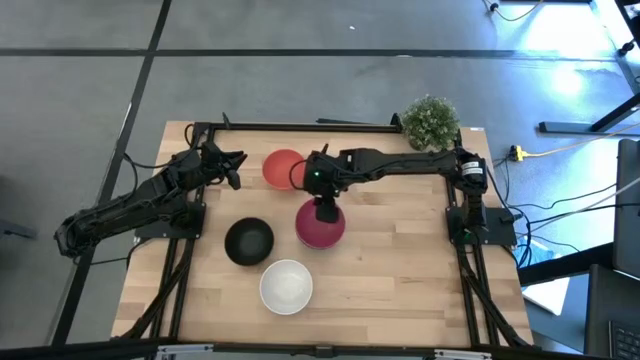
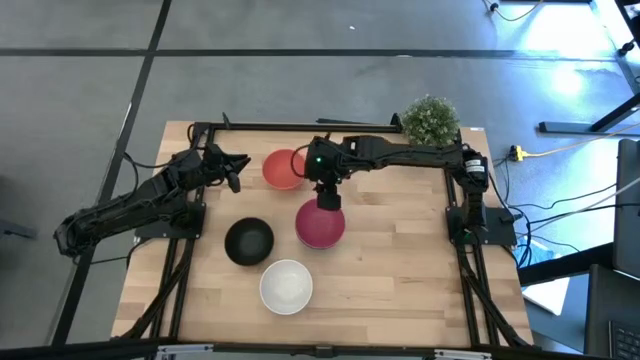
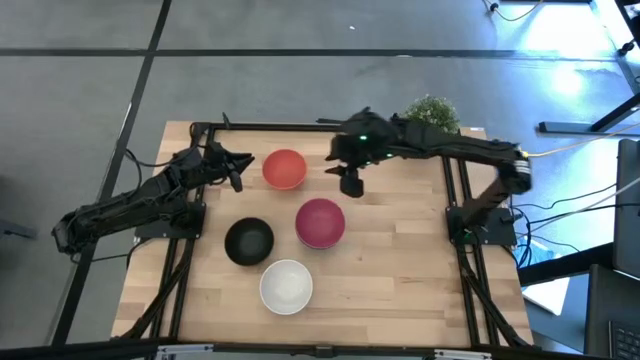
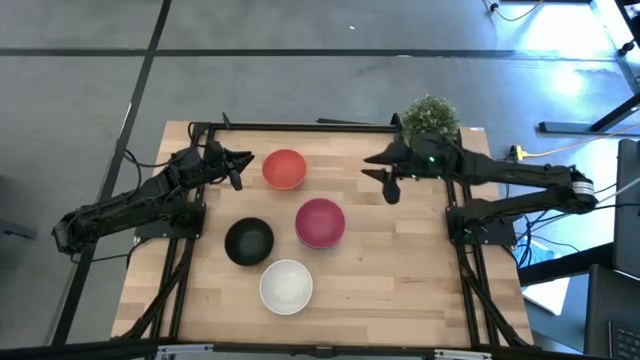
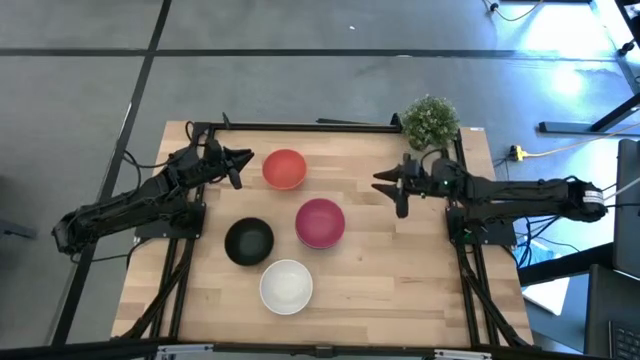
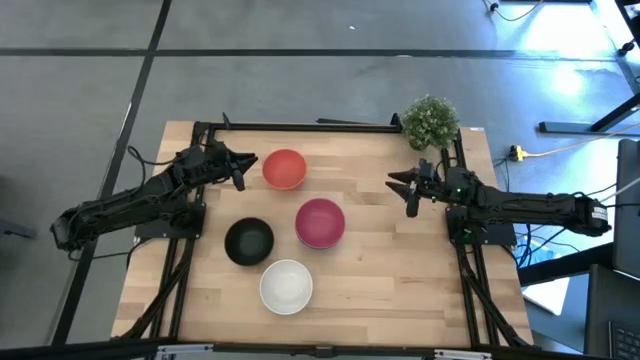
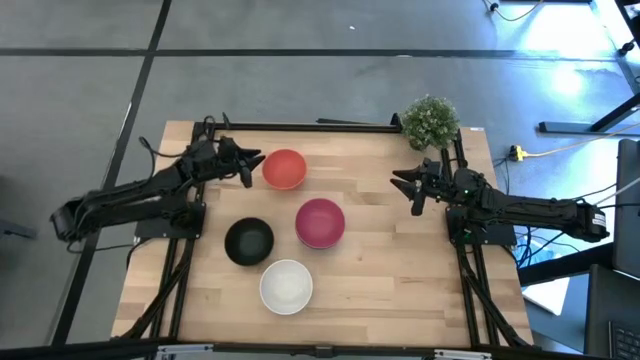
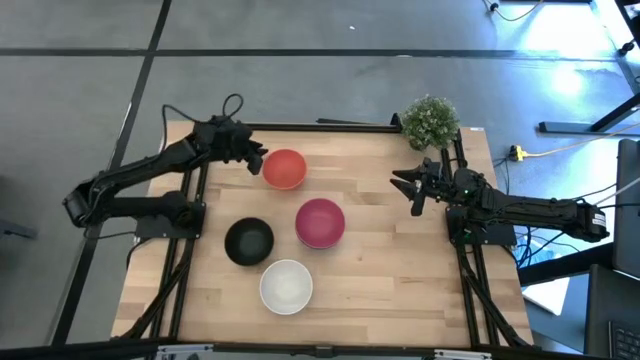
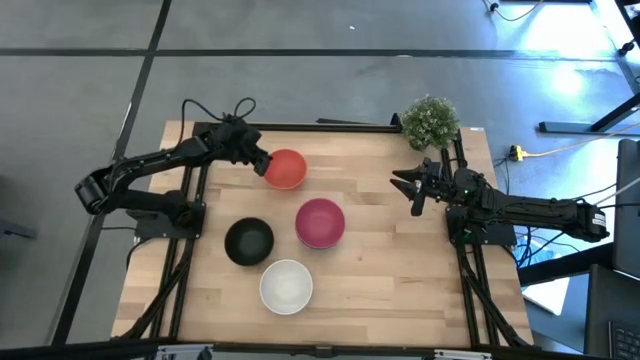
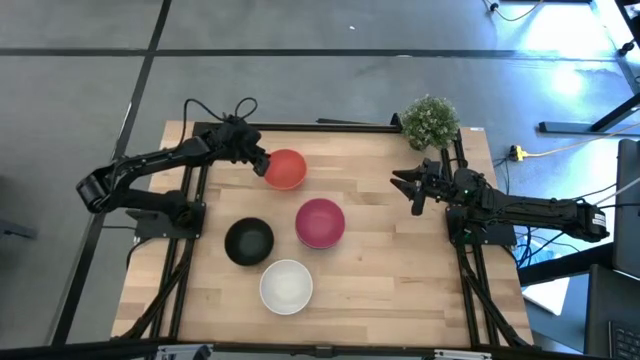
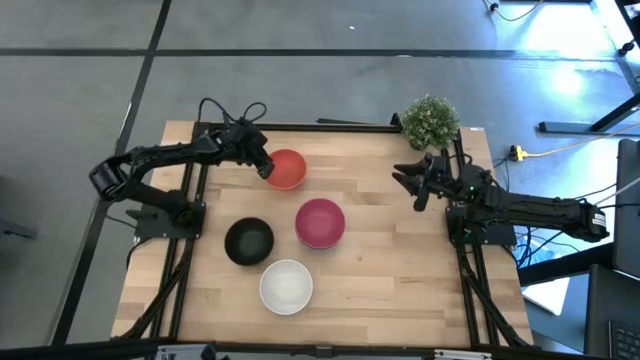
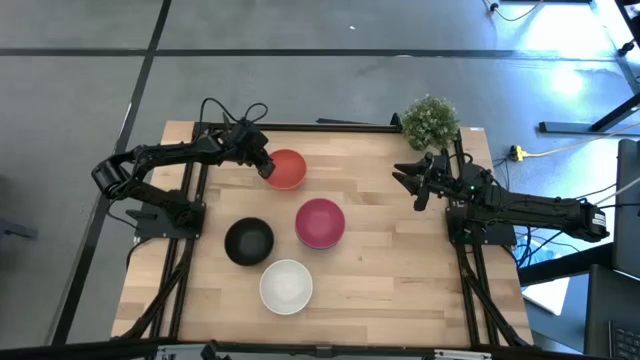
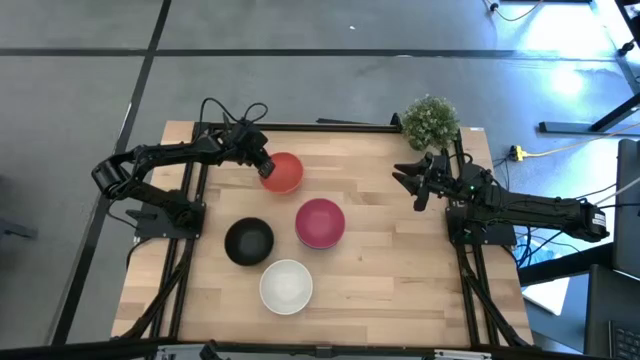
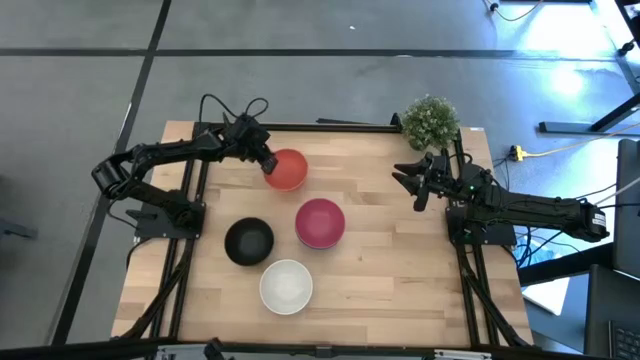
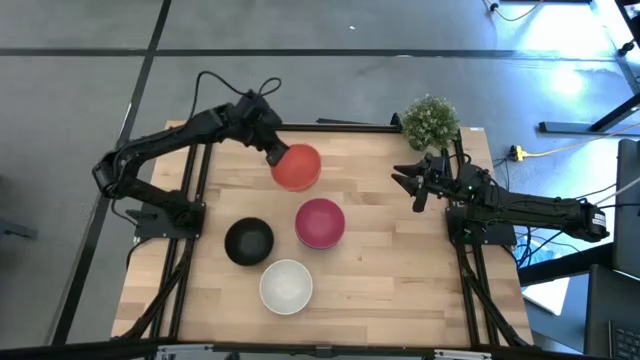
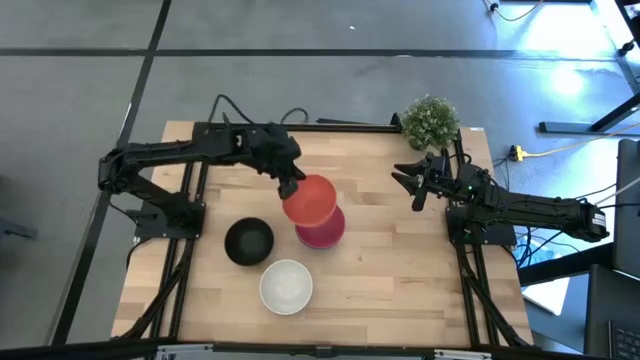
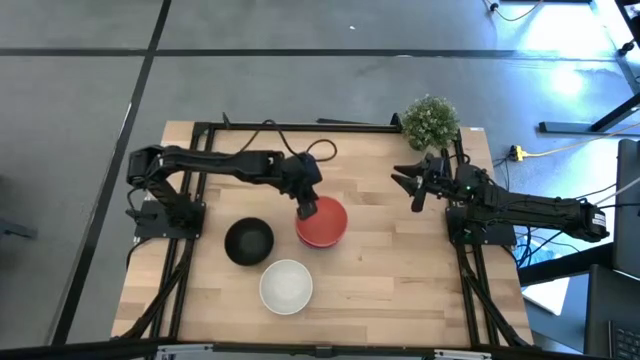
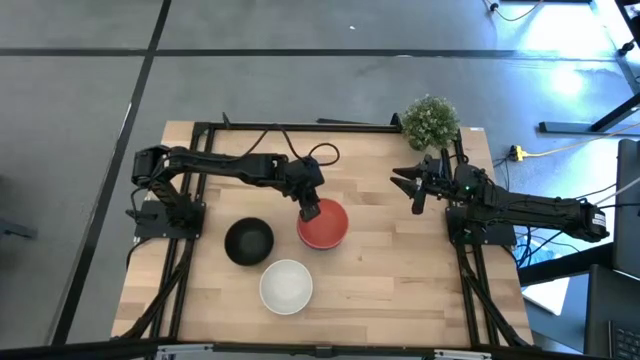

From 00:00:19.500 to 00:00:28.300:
Task: Nest bowls inside each other
Stack the orange bowl on top of the pink bowl

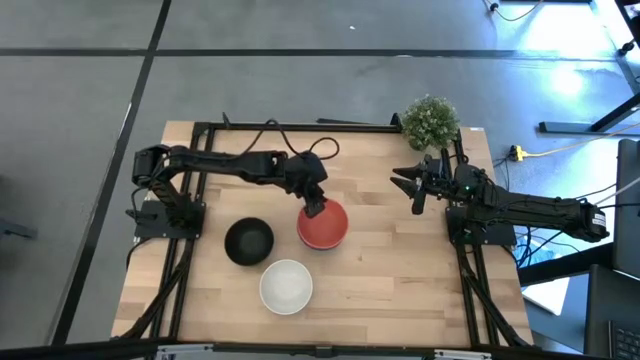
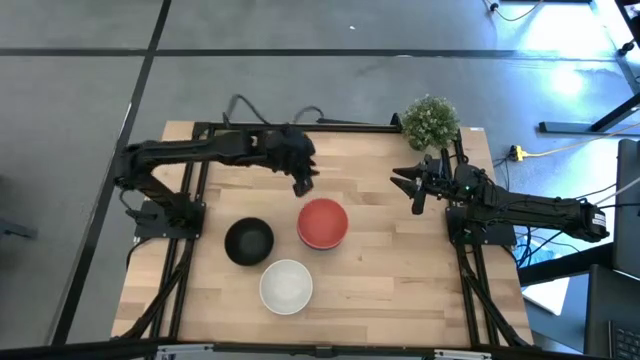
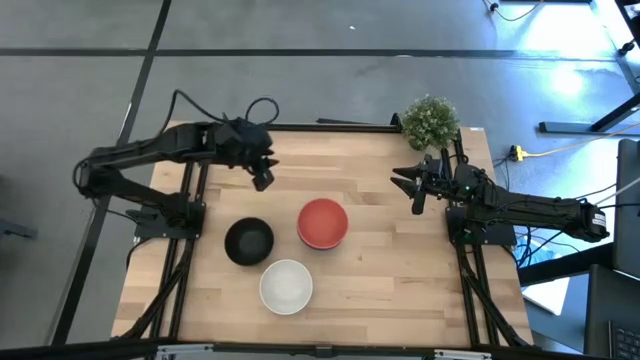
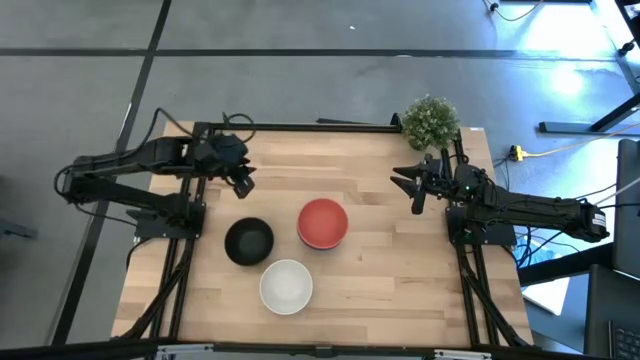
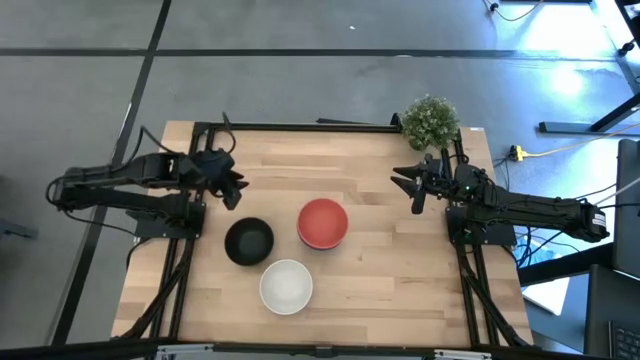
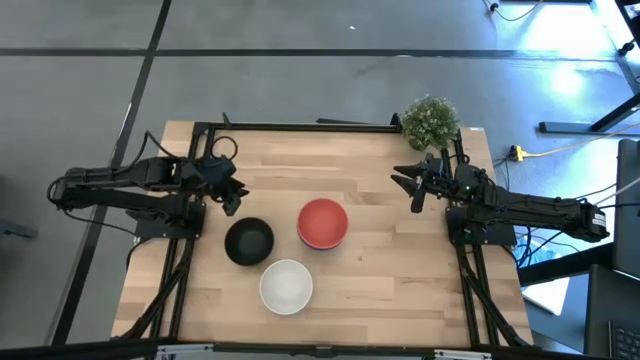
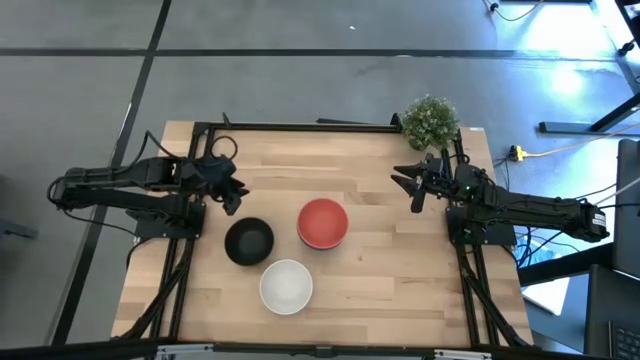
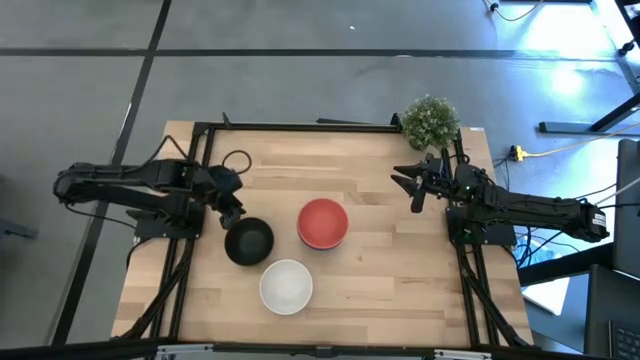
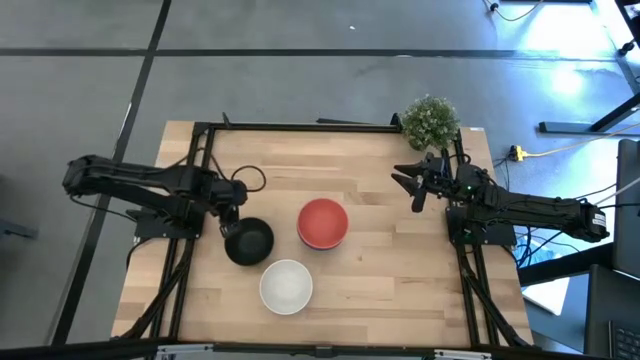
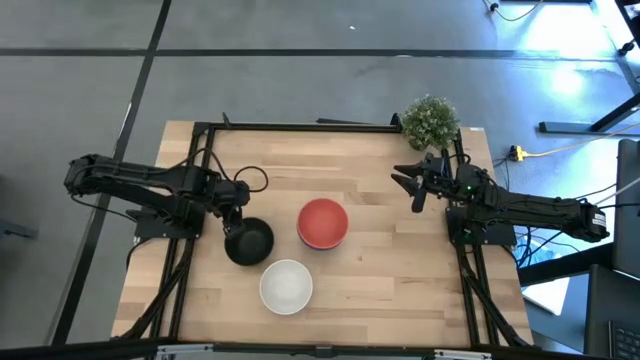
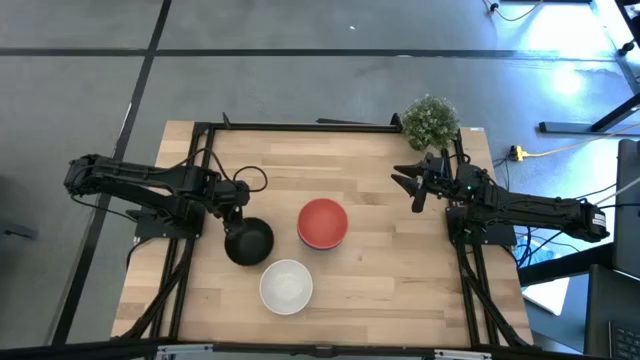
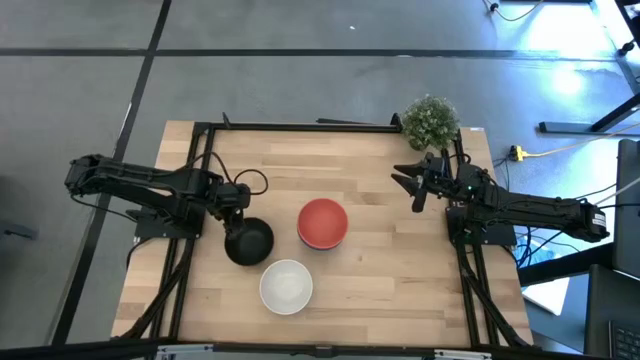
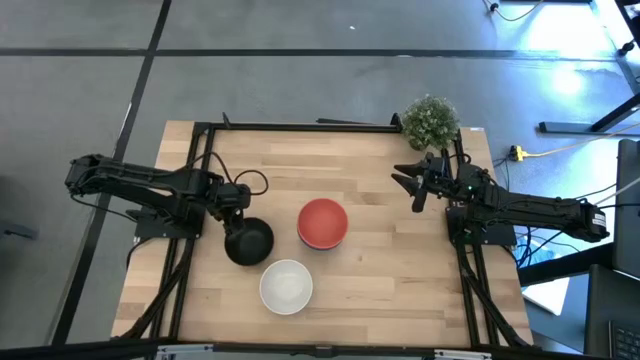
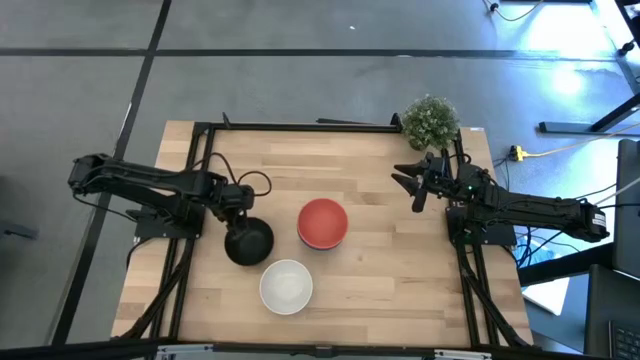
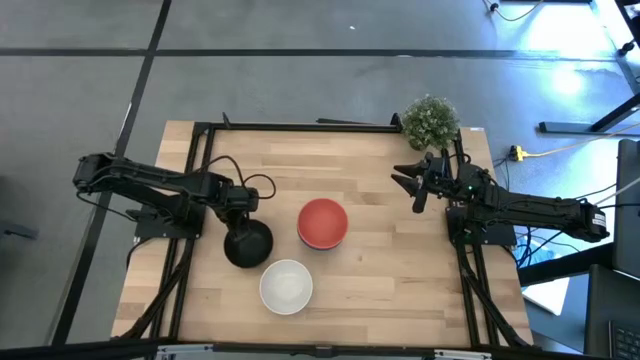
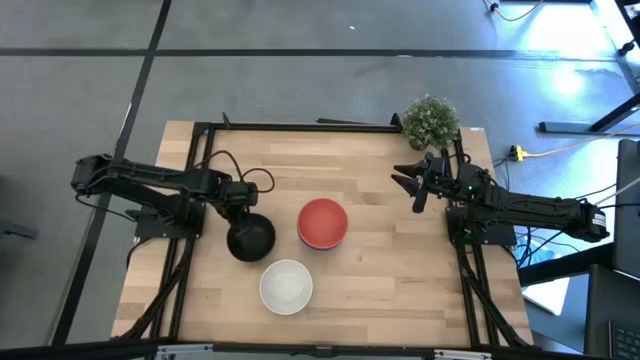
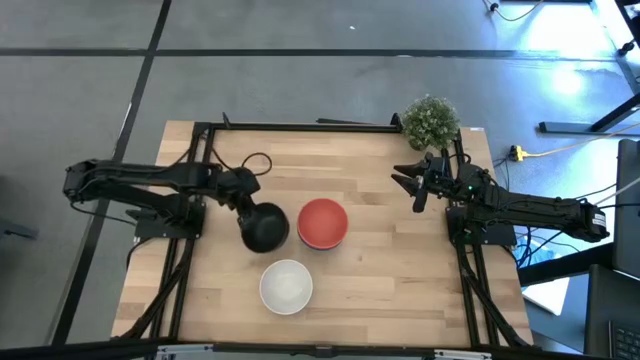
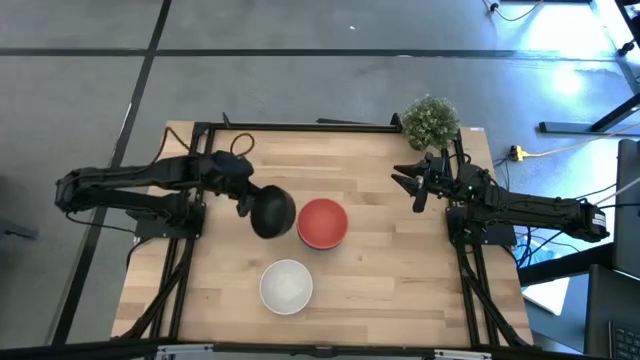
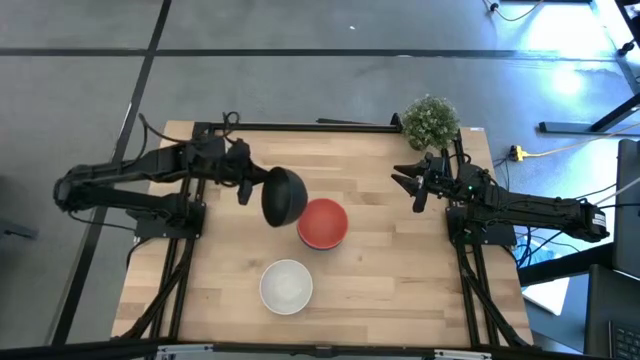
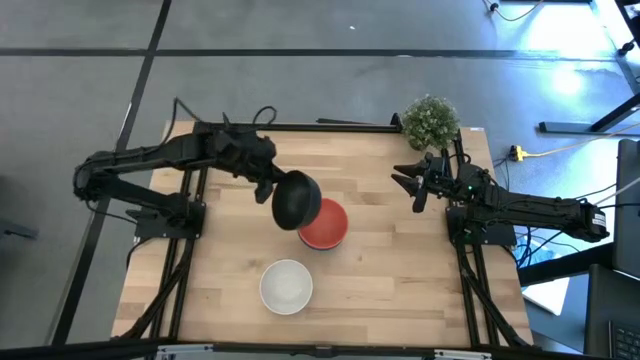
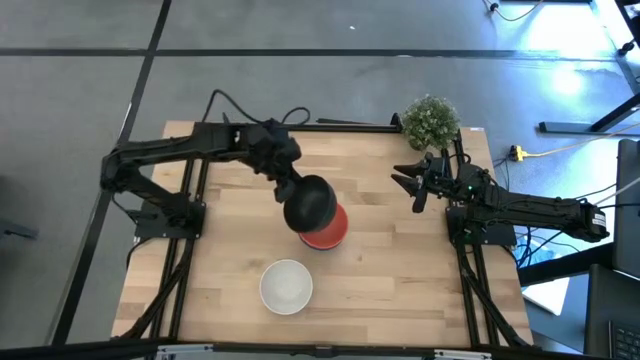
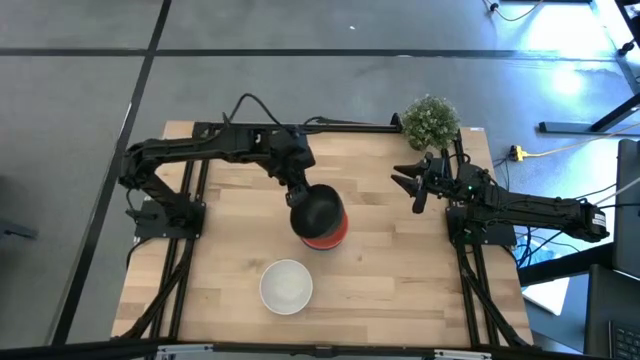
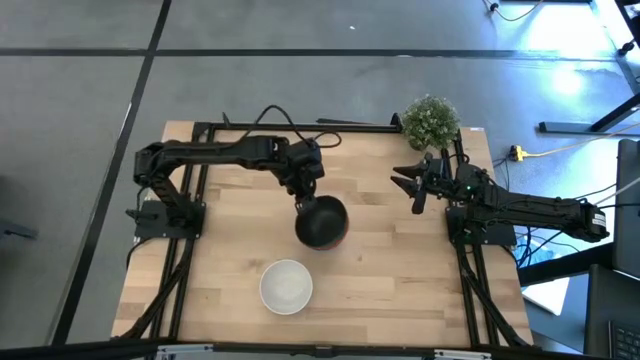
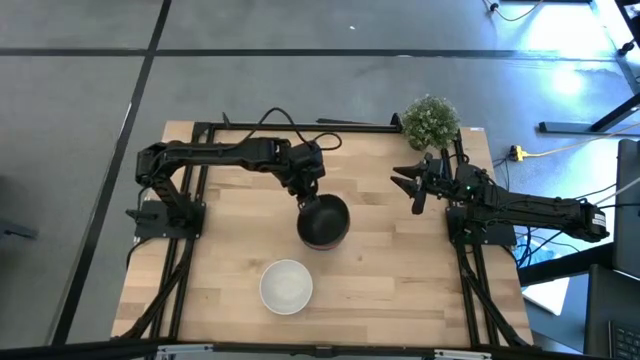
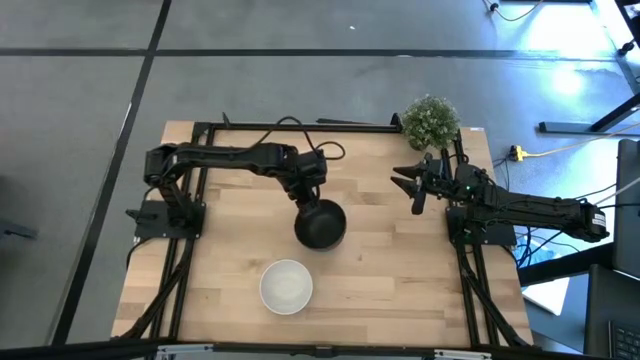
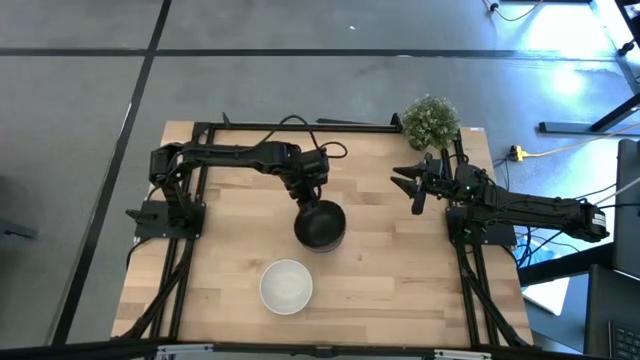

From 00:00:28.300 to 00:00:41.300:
Stack the black bowl on top of the orange bowl
